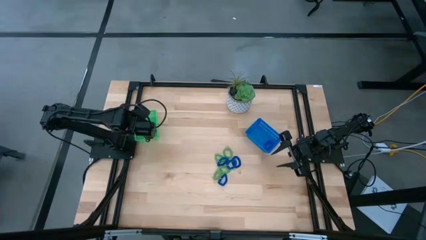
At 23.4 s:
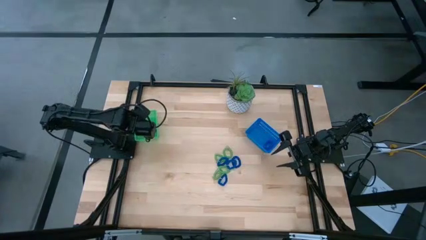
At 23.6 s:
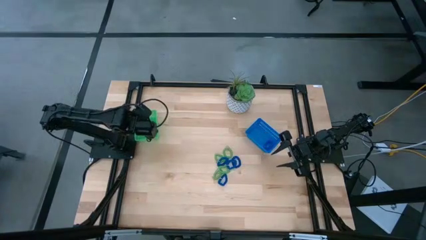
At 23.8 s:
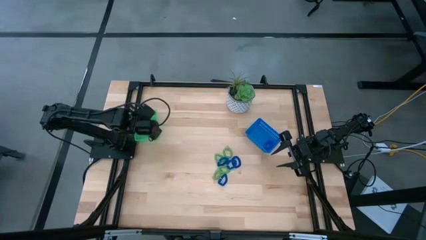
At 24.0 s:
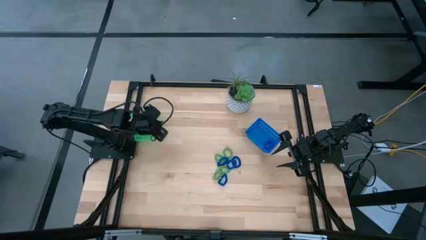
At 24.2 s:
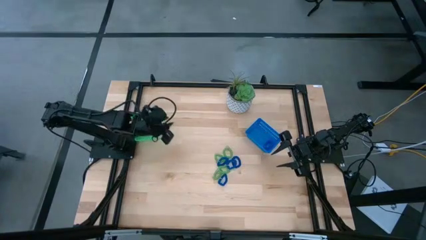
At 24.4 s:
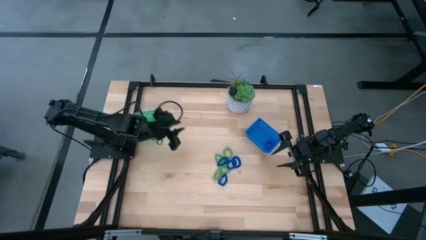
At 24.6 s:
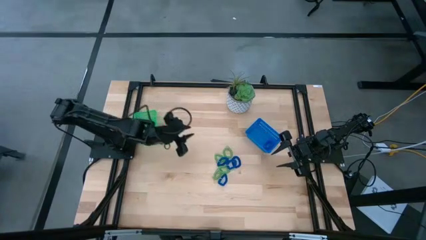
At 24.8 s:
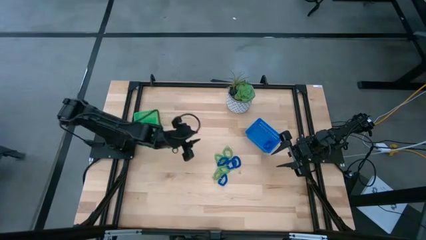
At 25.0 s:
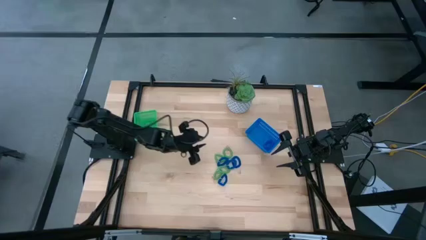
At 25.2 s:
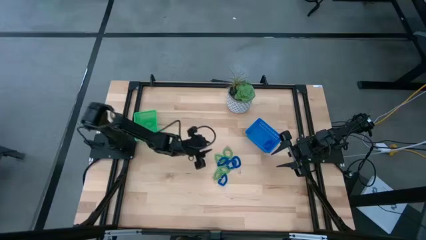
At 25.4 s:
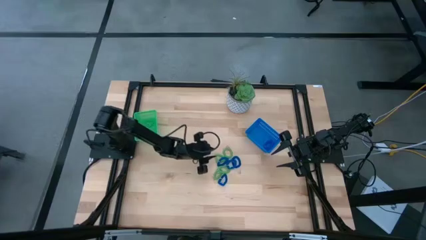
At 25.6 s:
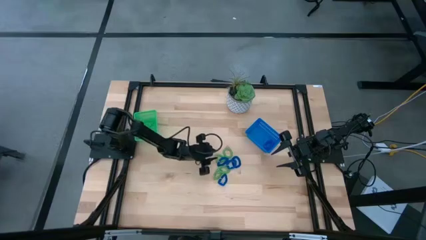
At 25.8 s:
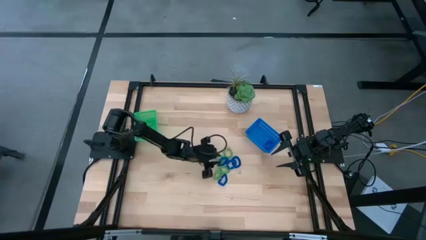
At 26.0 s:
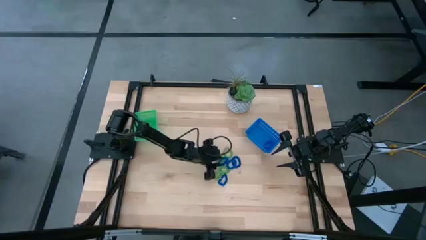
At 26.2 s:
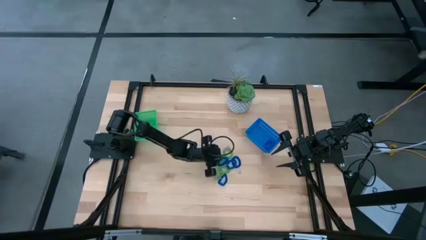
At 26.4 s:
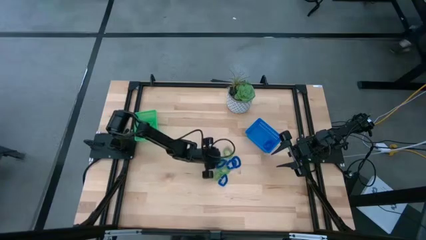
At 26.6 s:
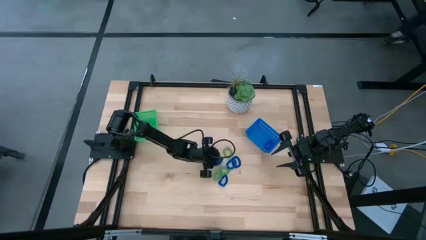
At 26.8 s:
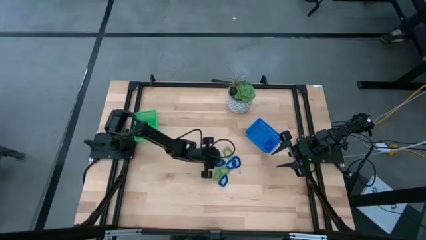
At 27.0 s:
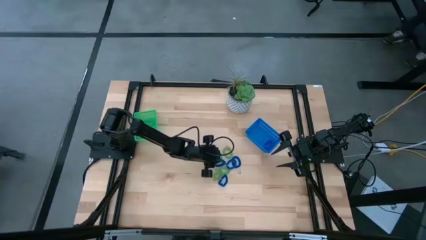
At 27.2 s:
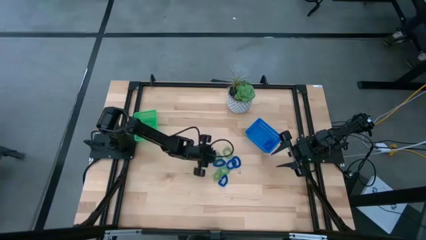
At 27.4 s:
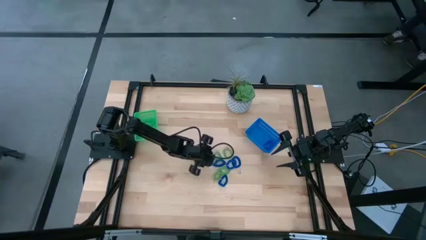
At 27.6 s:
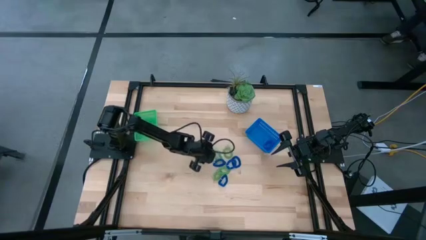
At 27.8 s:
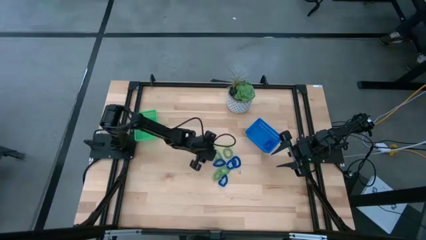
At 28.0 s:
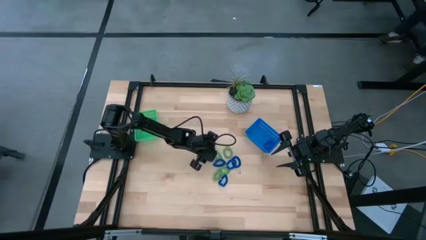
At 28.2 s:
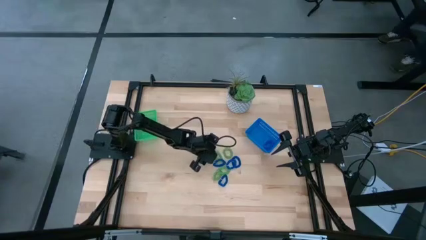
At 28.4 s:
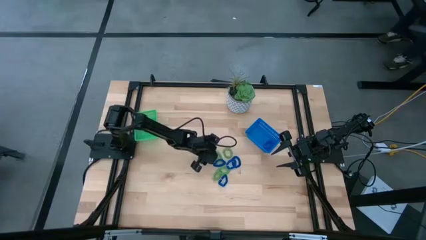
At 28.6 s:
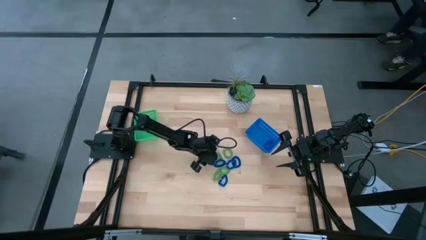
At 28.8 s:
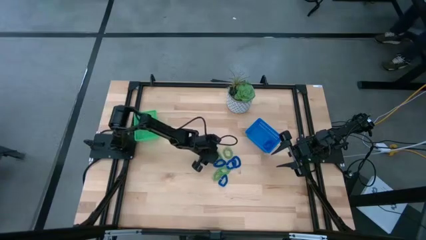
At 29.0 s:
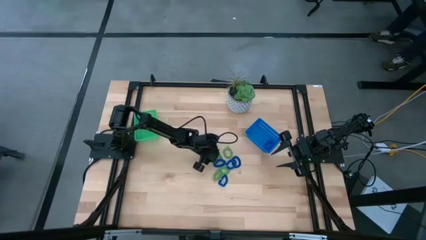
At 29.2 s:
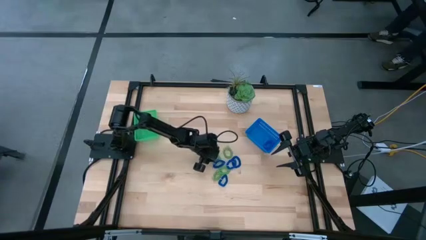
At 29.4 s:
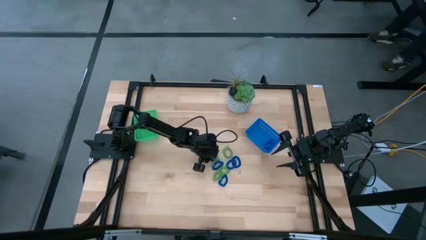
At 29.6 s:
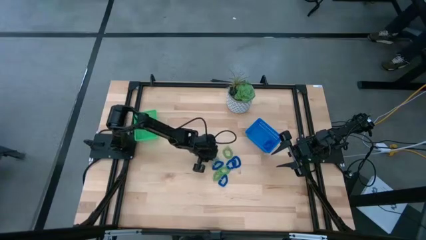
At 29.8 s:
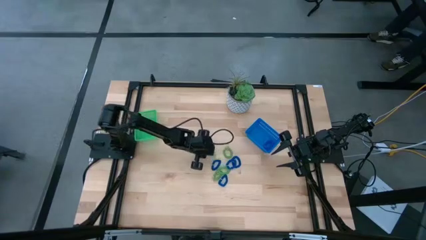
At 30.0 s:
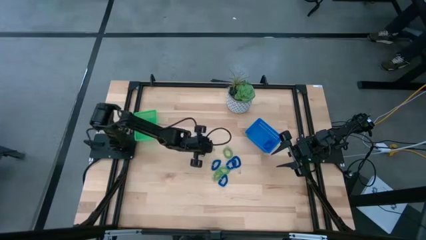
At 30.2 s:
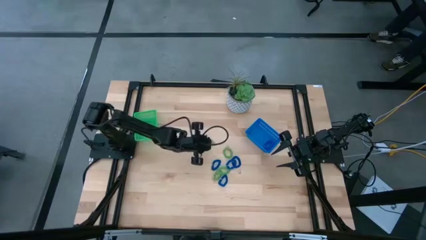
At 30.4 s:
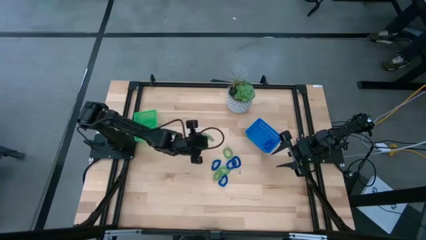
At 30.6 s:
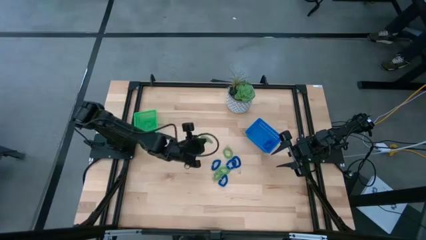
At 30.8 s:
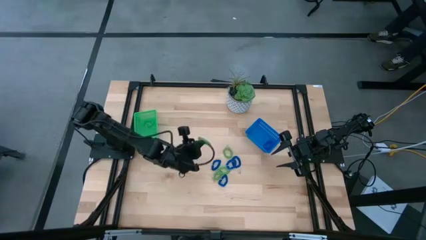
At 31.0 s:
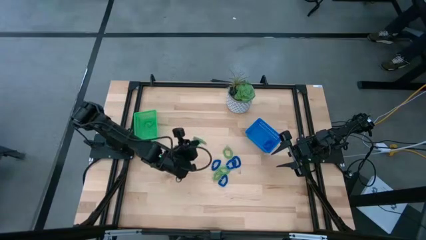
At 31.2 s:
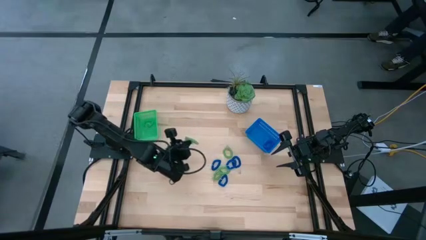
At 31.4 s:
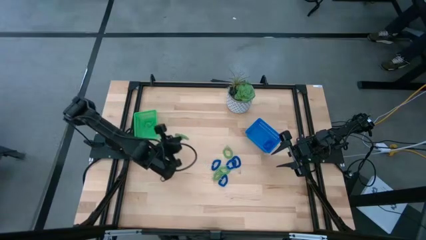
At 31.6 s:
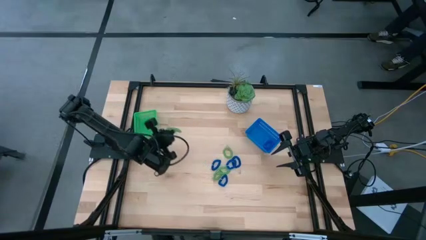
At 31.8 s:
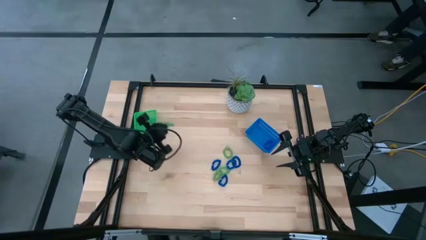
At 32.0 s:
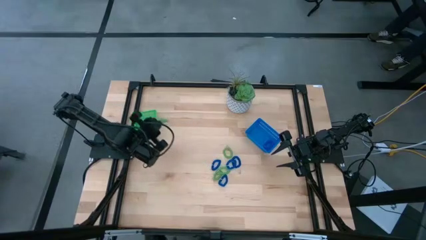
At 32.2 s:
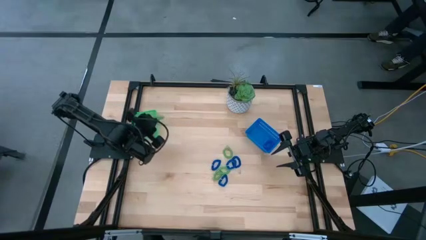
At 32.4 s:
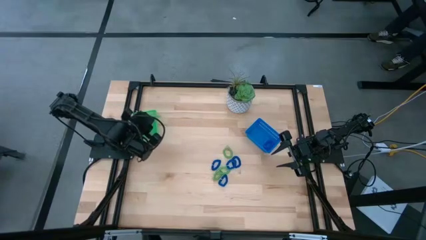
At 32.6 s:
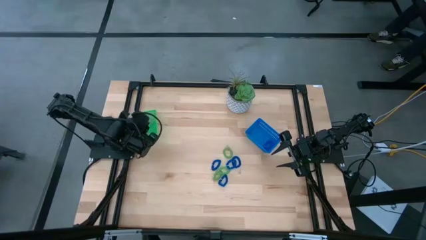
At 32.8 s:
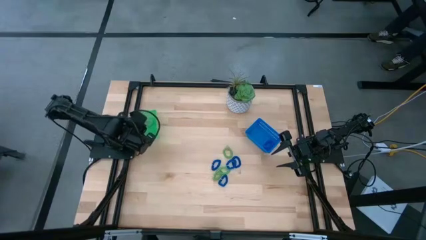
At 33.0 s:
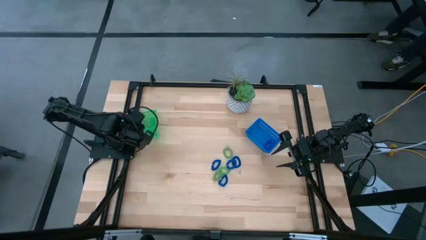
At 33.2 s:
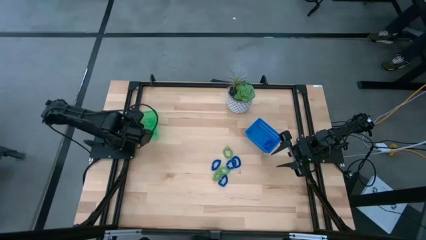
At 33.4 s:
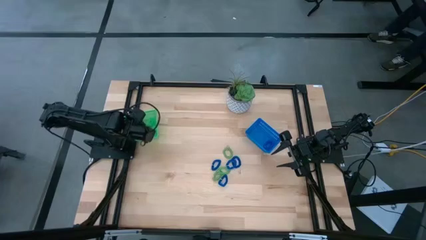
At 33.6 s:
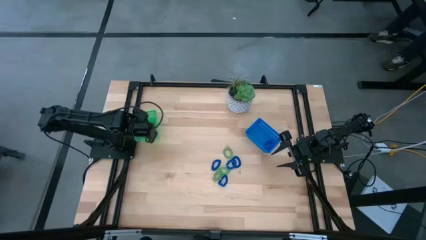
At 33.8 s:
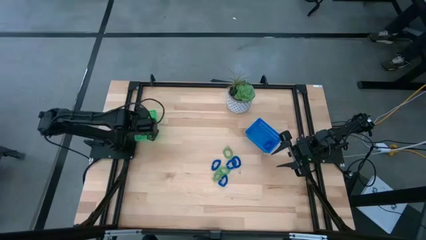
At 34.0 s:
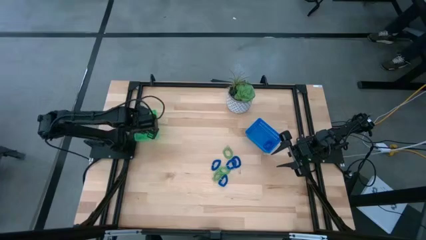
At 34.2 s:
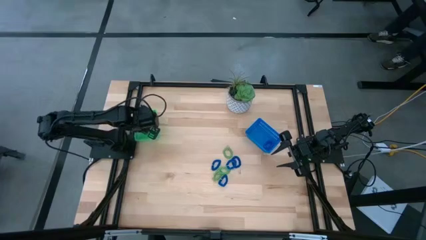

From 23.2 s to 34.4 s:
Task: Sort spring keychains
Put the green spring keychain in the green bin
